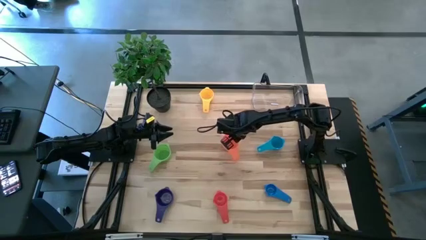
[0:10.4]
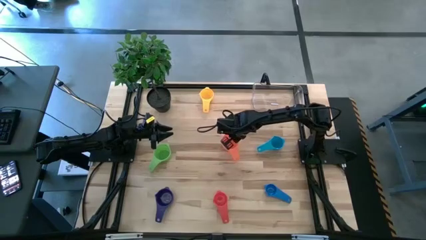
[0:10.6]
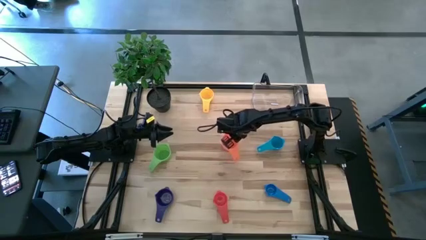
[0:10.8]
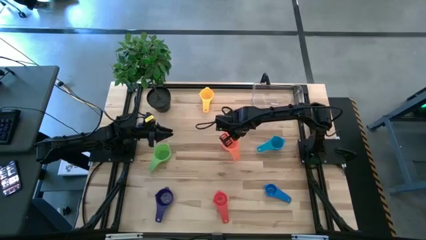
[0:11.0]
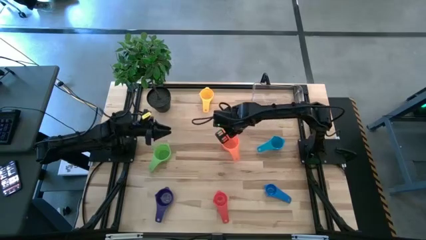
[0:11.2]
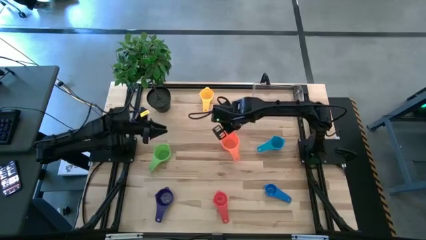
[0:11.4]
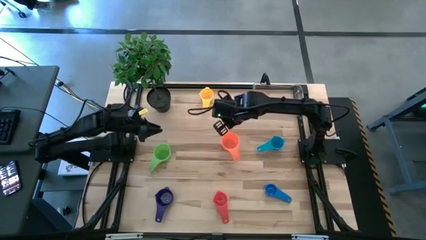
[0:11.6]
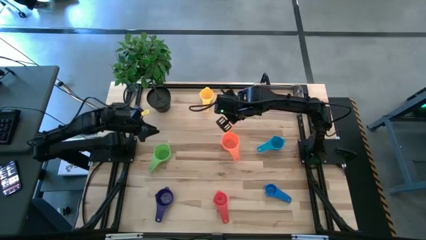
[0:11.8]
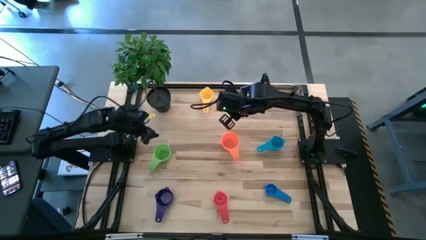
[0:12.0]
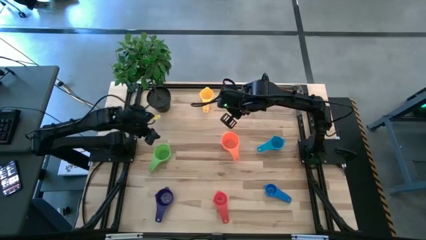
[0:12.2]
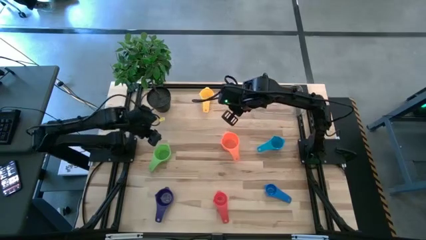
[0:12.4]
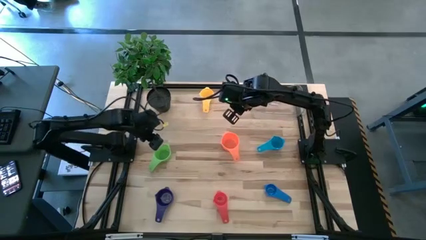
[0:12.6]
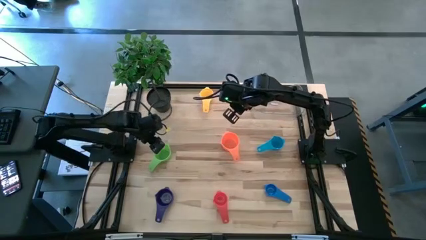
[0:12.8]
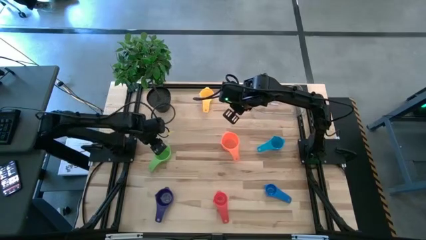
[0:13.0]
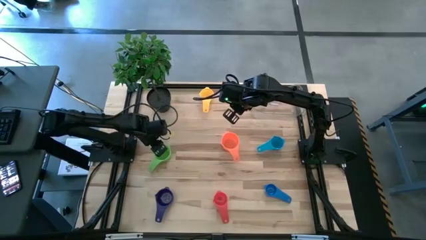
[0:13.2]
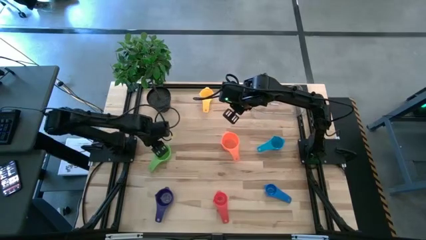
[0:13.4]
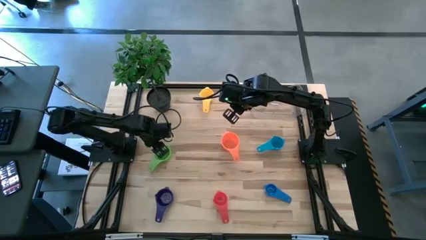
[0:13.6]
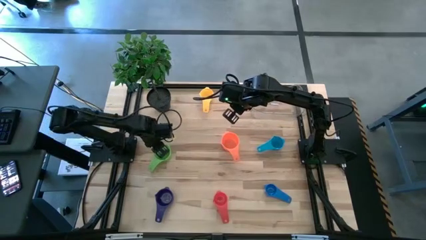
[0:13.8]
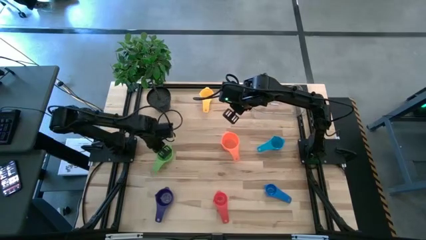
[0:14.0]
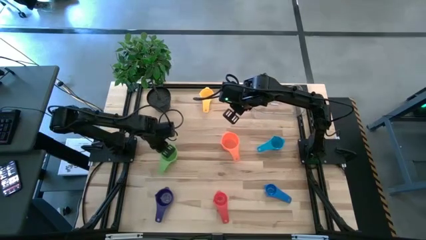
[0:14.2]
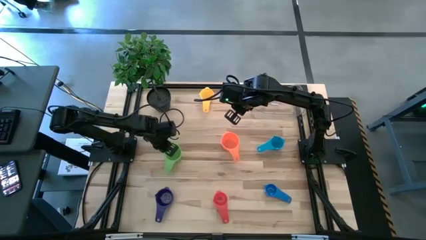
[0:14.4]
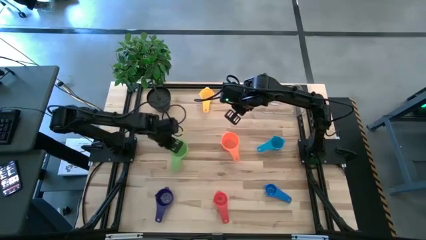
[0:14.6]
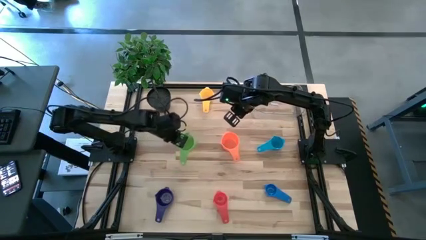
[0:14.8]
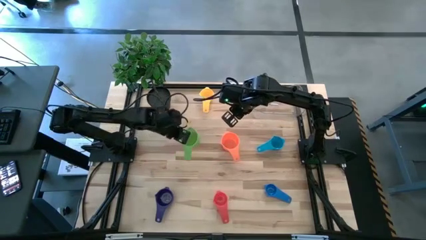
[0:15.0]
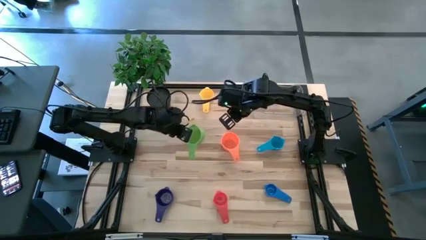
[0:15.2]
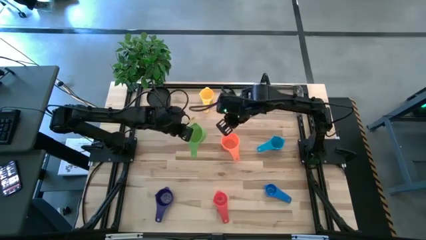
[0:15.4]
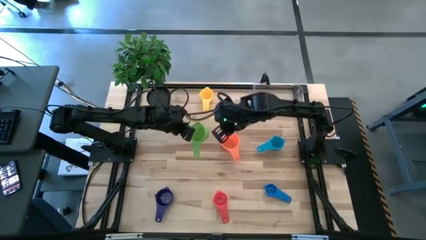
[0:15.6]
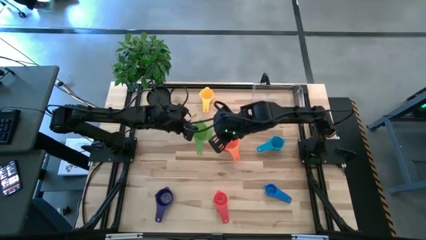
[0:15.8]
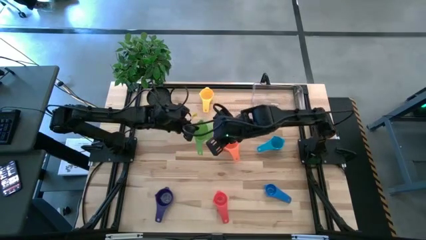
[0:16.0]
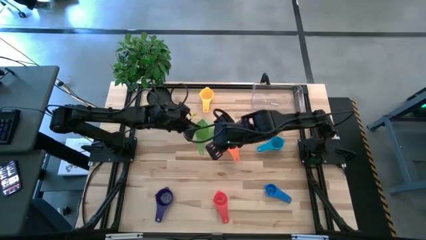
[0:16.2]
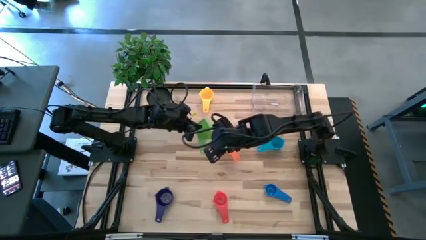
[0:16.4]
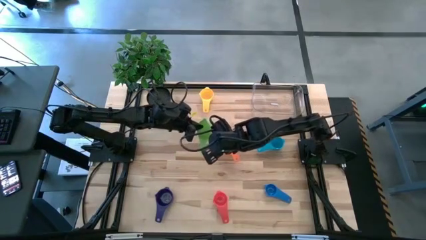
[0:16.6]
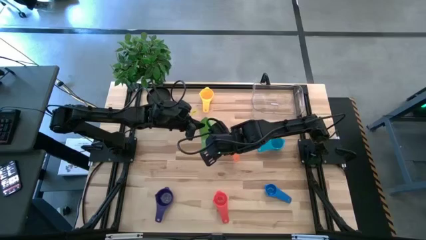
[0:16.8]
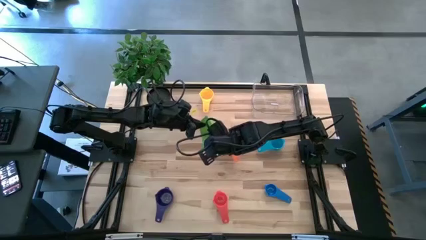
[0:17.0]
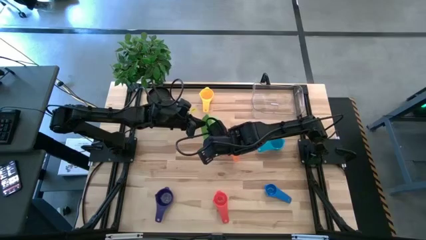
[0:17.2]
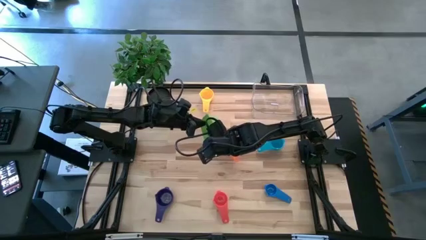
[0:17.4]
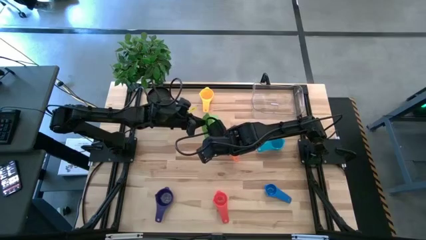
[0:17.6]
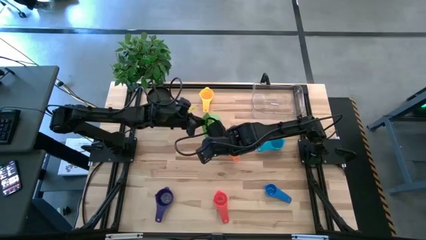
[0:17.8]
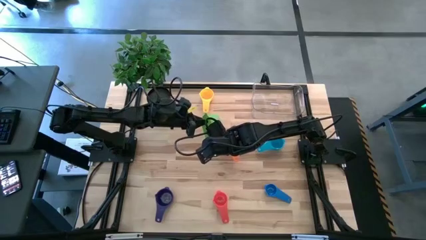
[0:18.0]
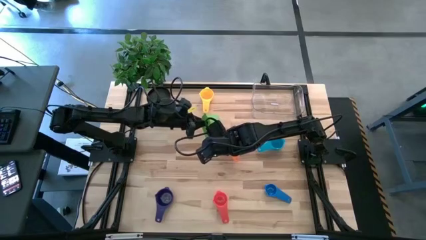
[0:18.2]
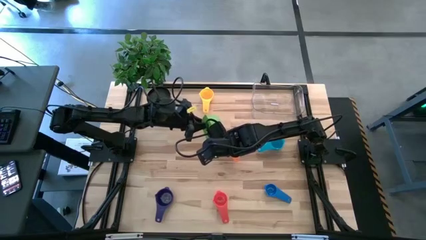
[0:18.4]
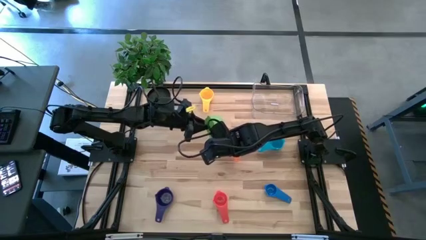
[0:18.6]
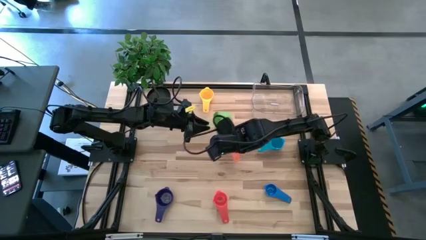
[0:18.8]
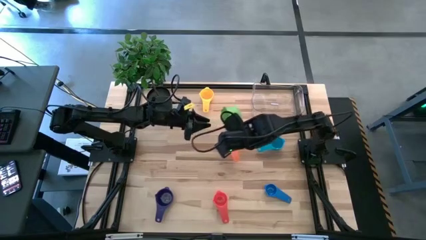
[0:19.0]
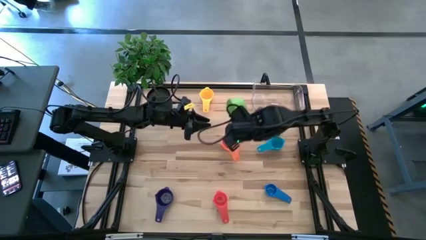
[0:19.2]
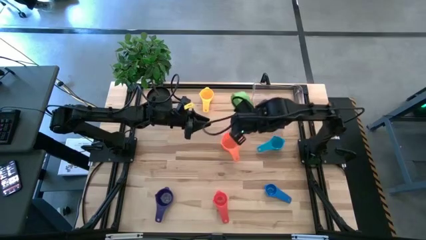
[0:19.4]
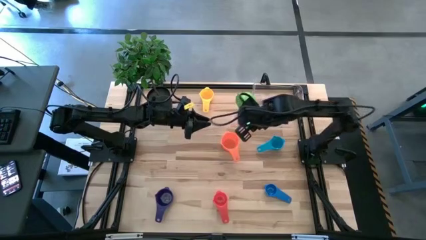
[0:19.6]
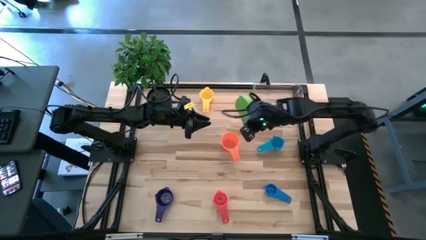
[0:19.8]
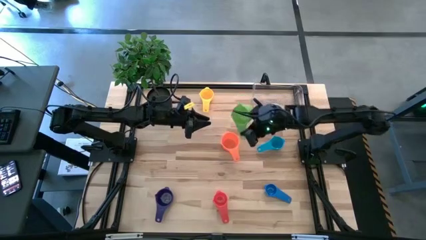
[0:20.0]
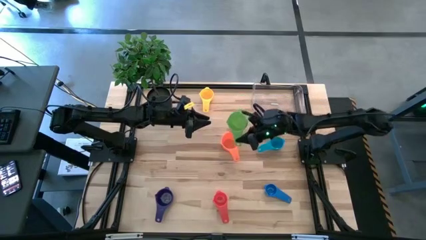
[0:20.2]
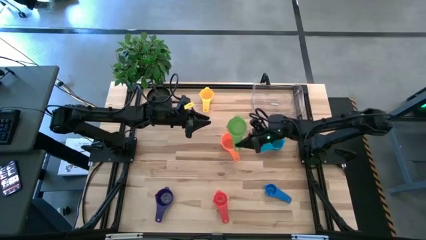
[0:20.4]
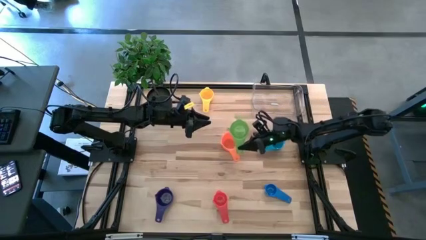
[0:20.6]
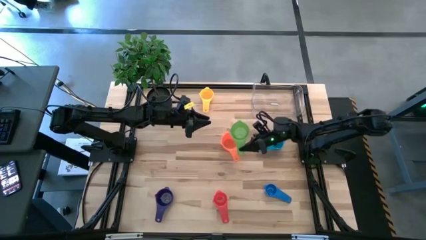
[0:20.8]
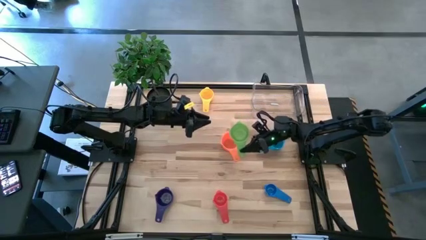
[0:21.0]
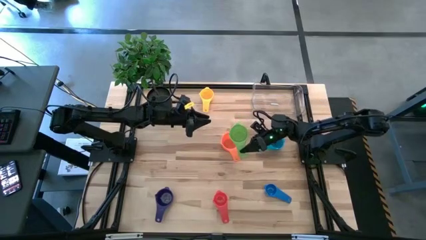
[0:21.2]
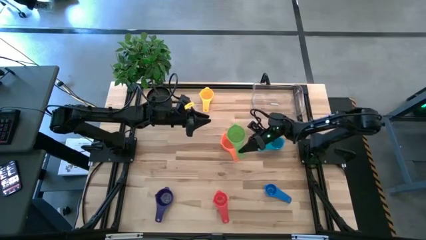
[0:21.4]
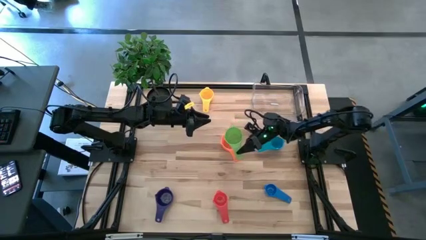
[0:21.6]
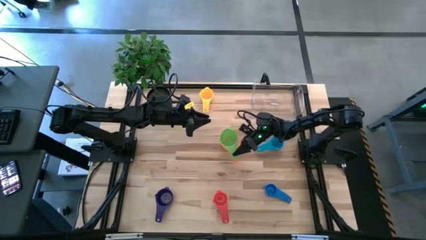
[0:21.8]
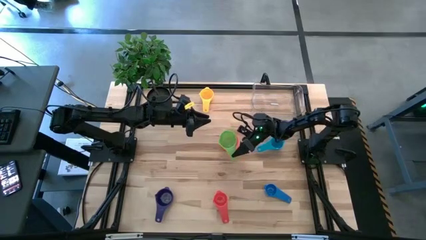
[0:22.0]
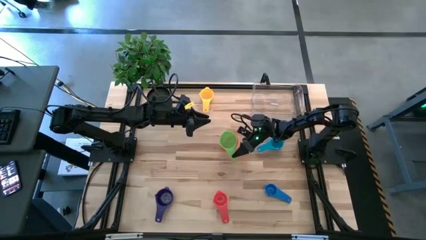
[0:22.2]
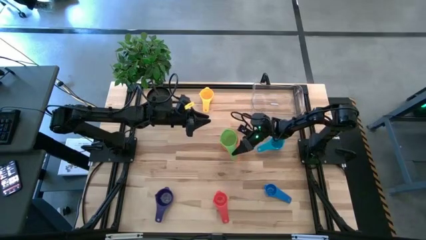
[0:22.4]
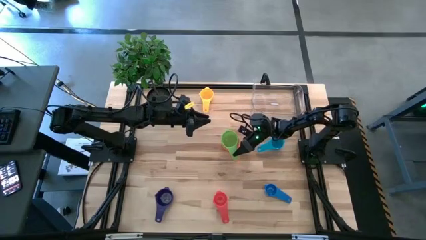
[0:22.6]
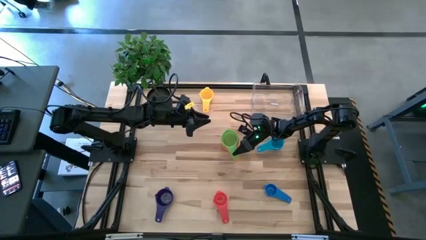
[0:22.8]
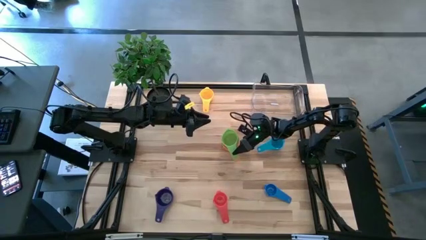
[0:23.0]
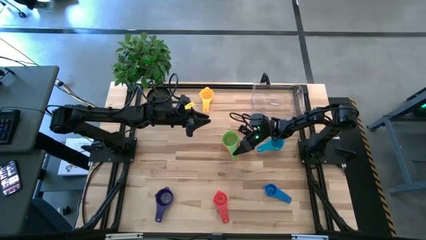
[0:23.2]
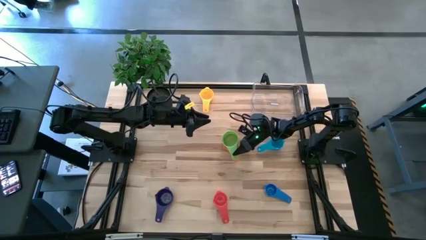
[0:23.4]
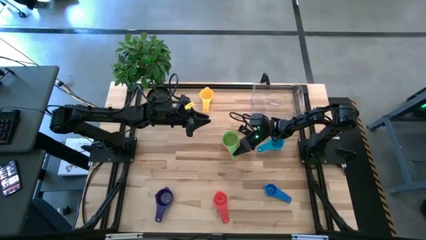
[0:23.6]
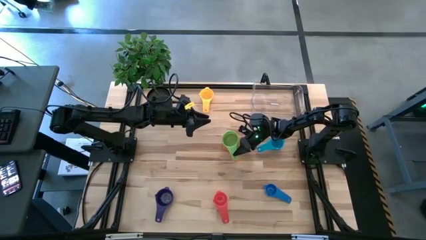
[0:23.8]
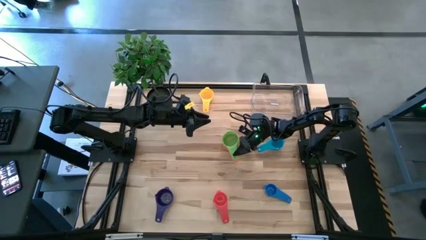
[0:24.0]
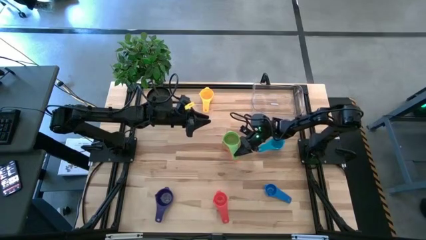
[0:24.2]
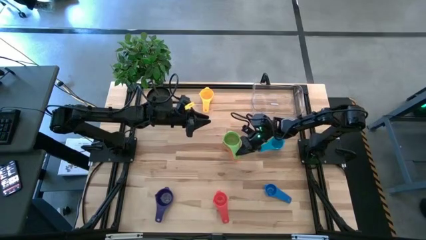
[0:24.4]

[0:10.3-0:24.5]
Task: Nest measuring cups in basket
Stack the green measuring cup on the orange measuring cup
